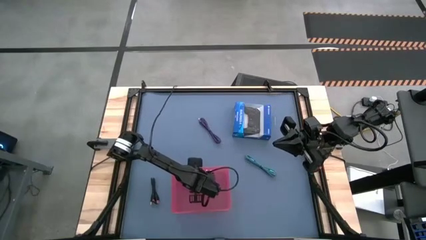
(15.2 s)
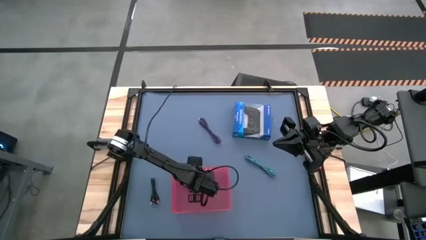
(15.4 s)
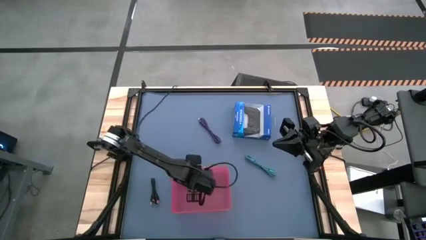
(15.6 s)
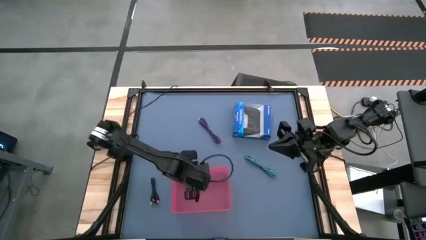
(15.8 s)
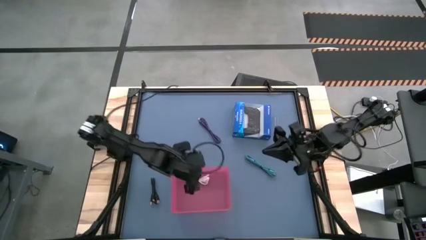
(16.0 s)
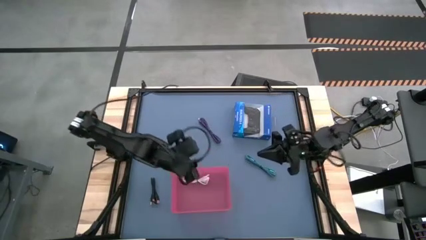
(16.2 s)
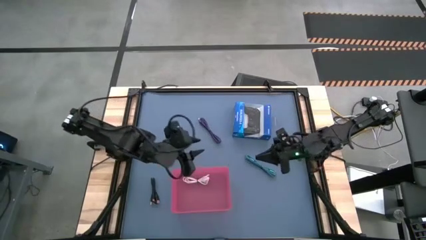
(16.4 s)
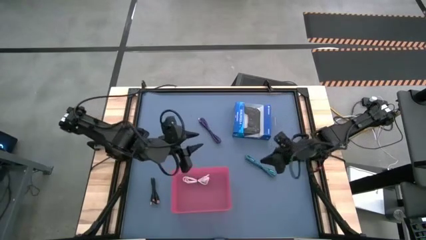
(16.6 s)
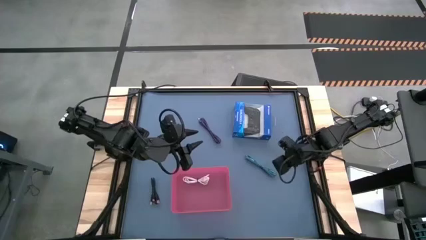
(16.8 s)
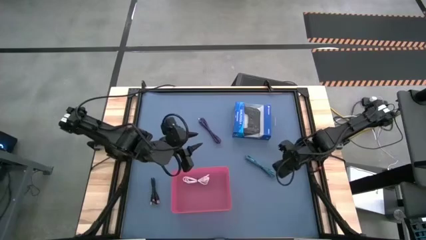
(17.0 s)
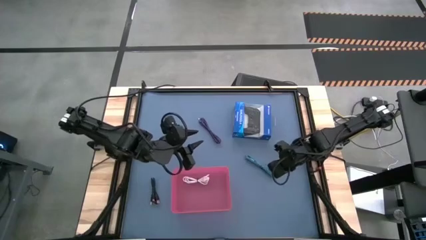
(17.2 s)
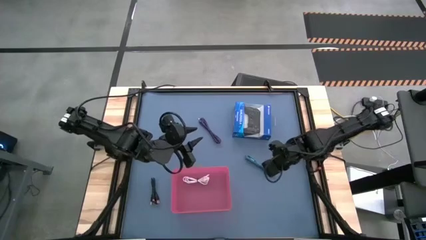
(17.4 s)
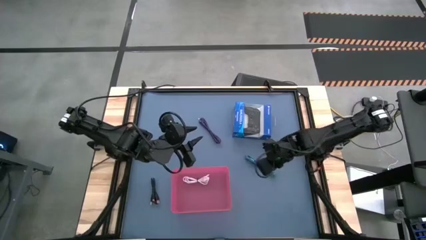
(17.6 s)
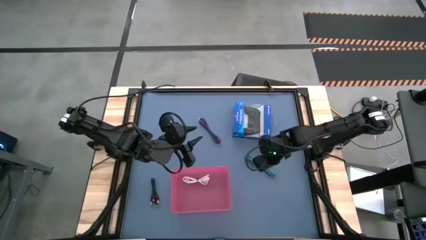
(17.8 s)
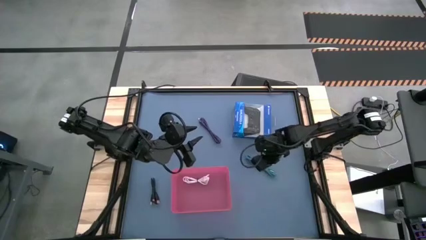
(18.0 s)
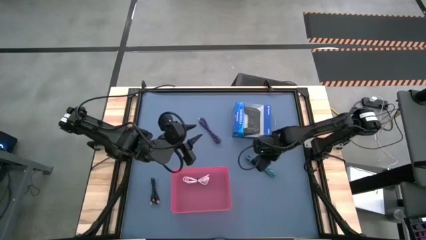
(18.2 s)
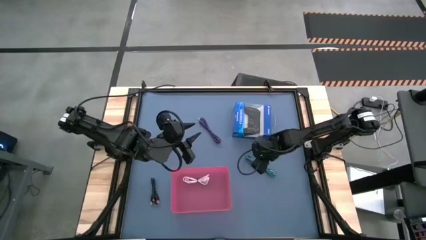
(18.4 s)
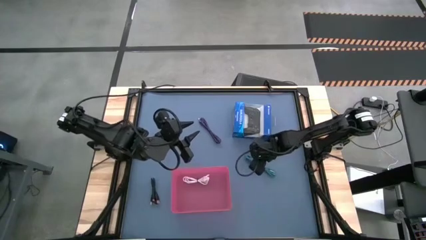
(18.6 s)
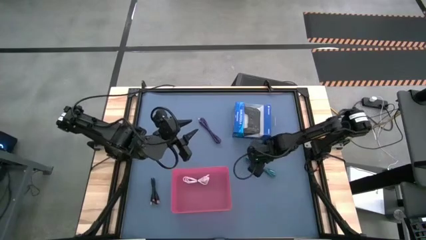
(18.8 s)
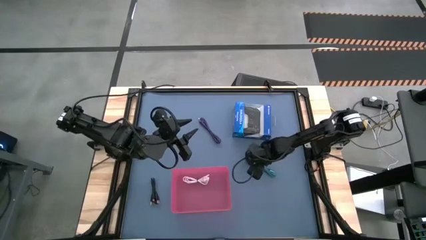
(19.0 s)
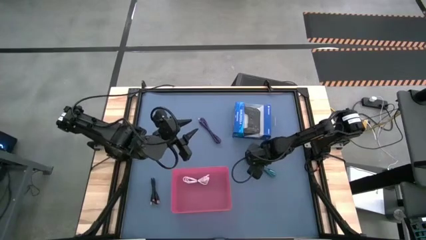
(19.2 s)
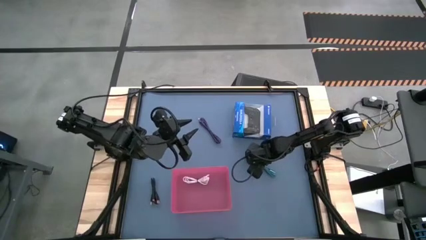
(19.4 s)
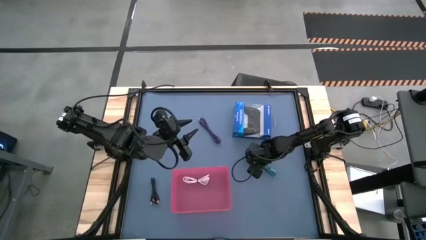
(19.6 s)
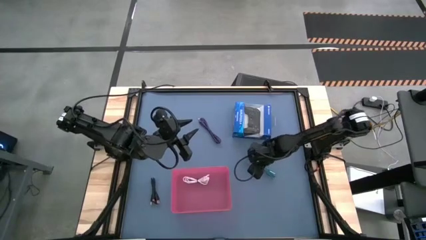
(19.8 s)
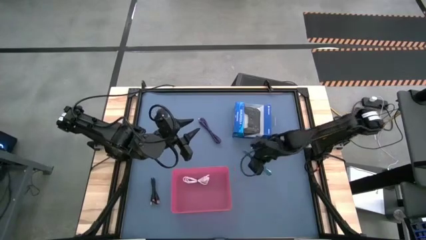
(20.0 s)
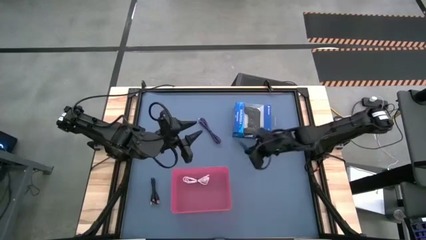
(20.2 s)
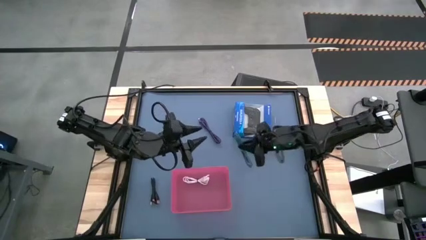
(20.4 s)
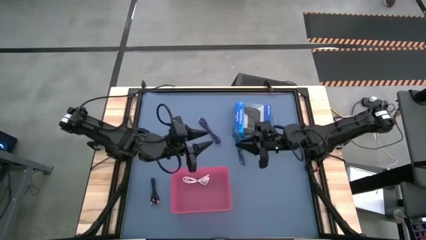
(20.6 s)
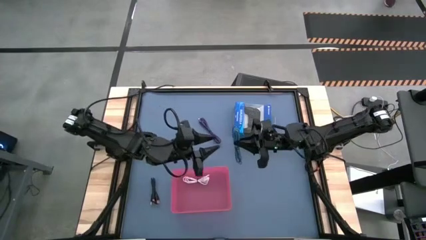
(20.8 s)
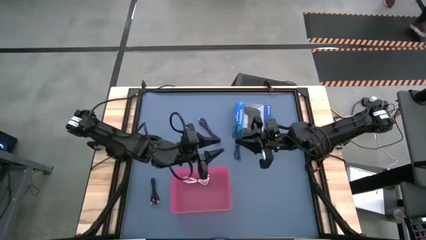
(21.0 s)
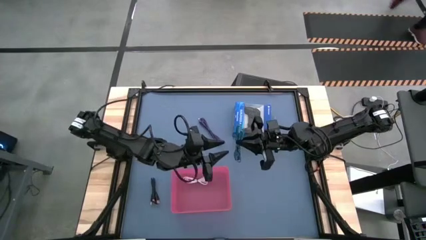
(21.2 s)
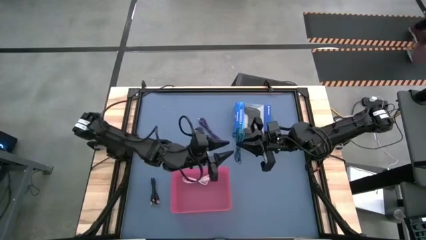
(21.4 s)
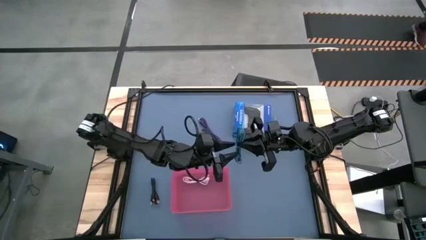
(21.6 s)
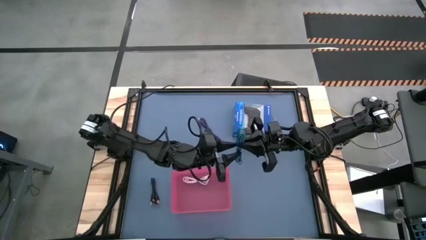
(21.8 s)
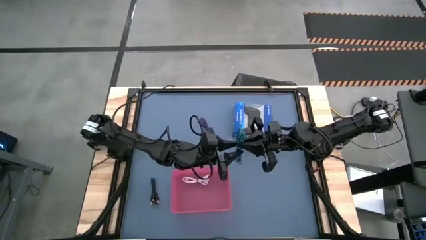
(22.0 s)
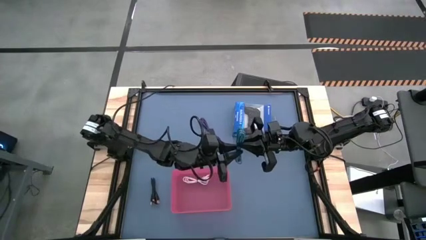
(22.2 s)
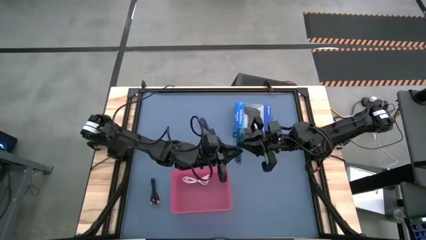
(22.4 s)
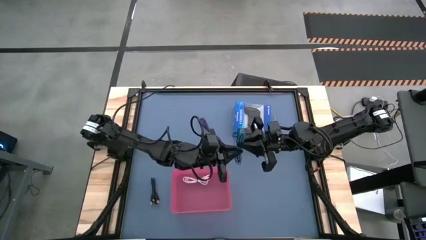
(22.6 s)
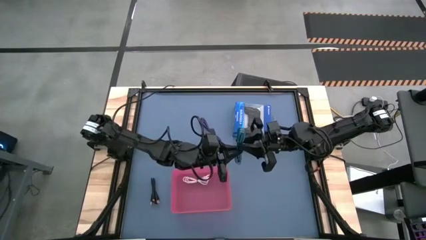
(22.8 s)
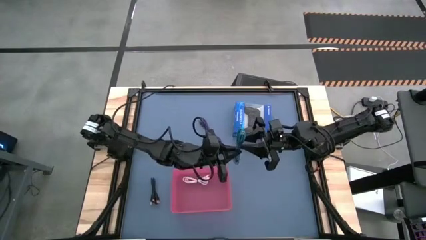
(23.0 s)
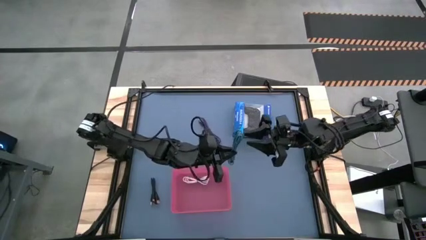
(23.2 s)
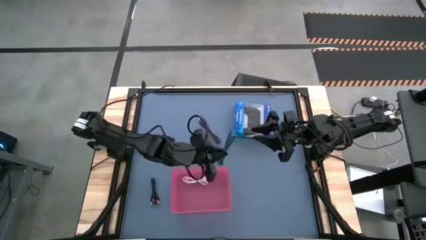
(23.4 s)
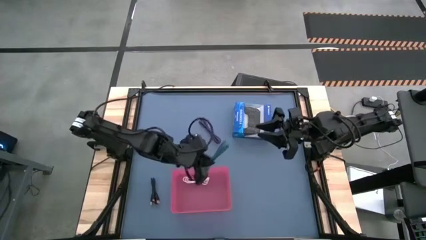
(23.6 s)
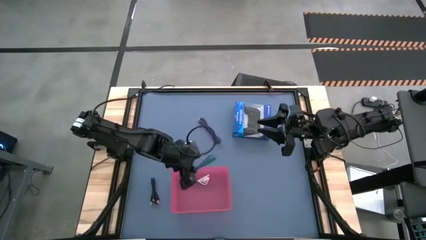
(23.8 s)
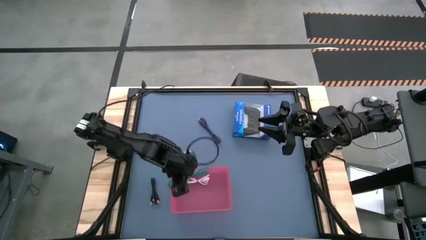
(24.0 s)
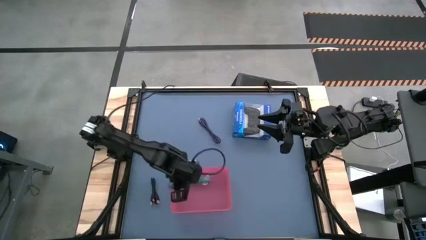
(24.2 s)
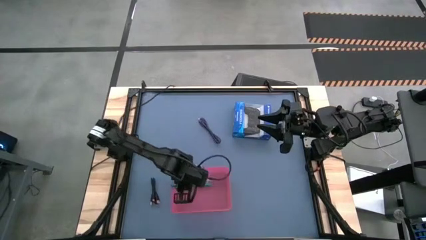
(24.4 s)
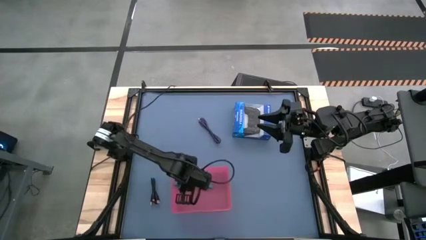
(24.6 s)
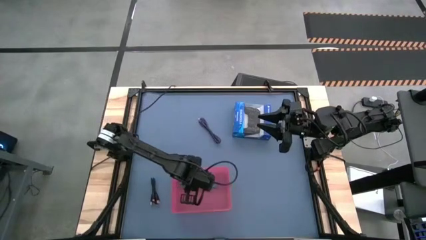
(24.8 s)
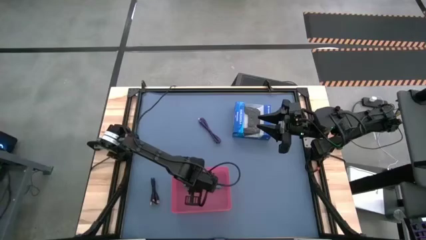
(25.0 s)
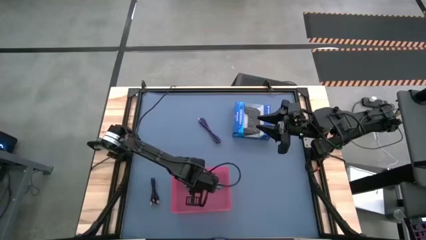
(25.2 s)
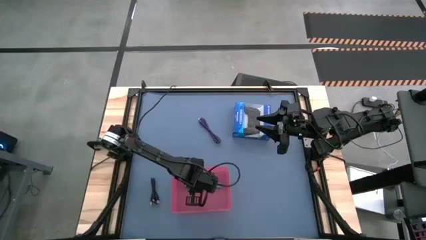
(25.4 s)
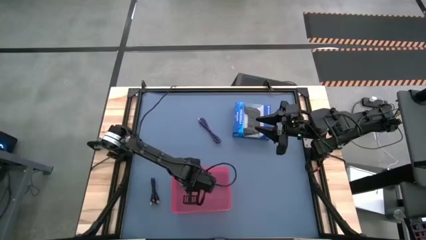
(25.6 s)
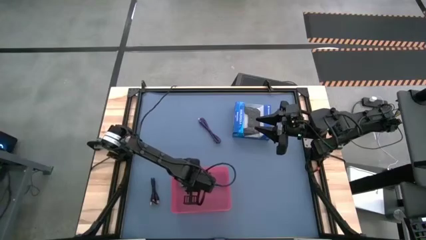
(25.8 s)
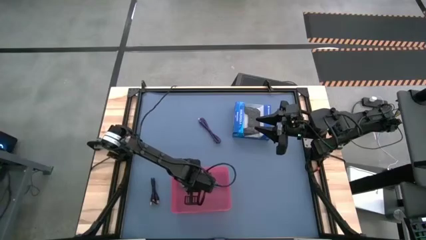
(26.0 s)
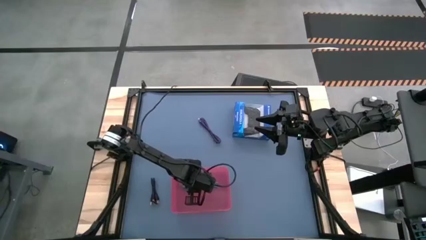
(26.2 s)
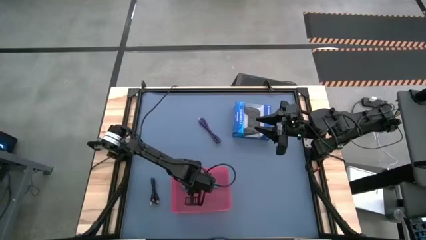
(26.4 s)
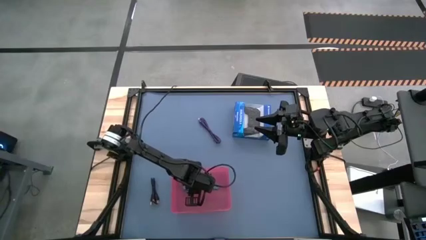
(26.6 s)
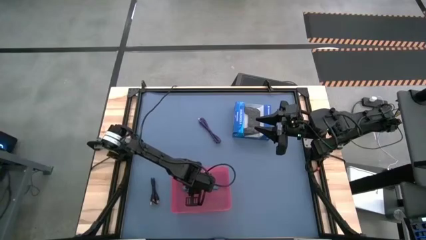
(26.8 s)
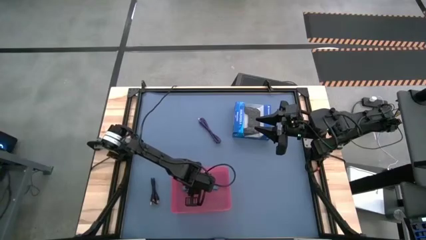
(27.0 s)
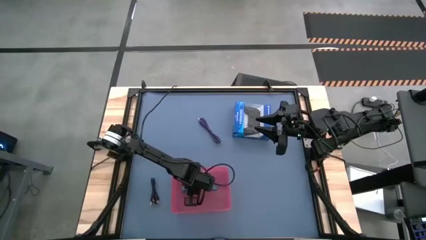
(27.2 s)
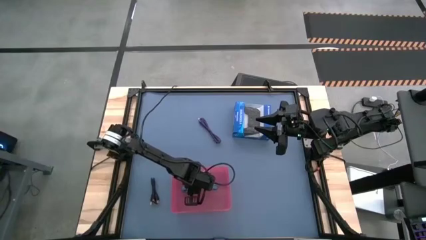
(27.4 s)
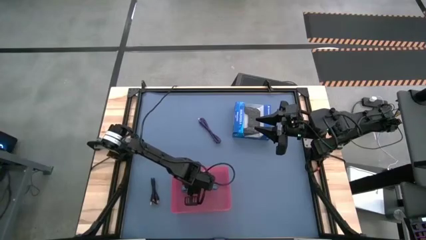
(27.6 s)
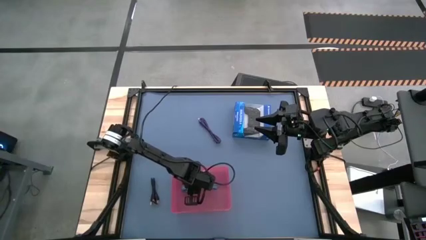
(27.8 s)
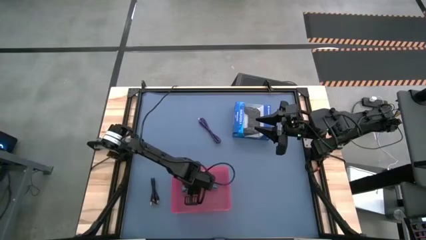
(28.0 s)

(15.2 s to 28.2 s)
Task: Pick and place USB-C Cables
Put the black and blue charger cable into the pink bin
